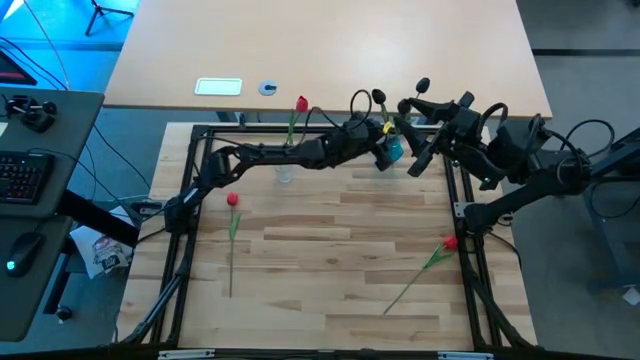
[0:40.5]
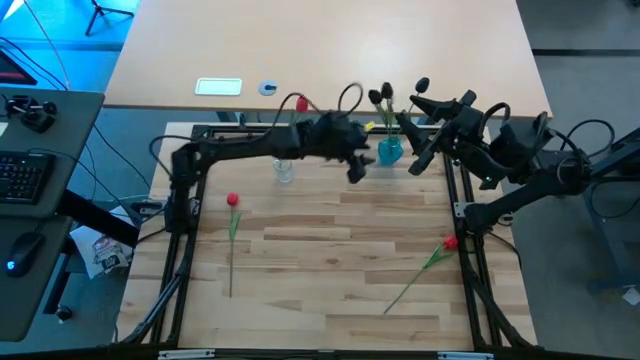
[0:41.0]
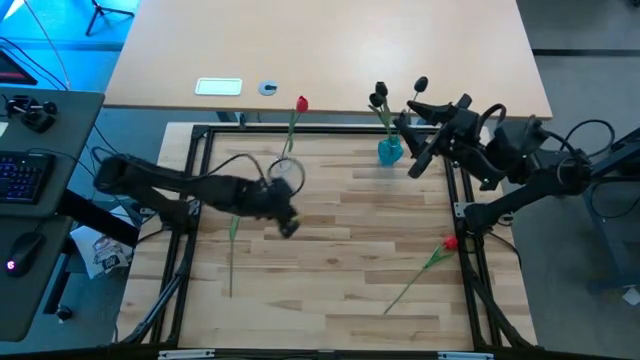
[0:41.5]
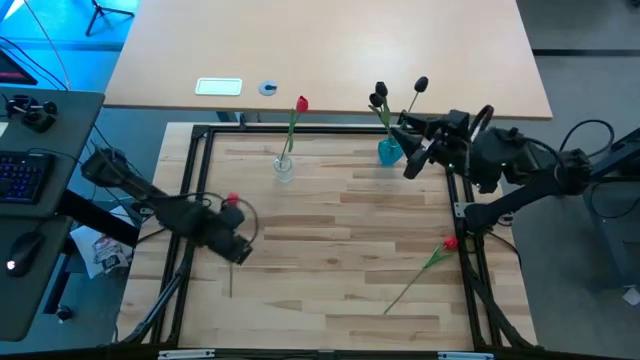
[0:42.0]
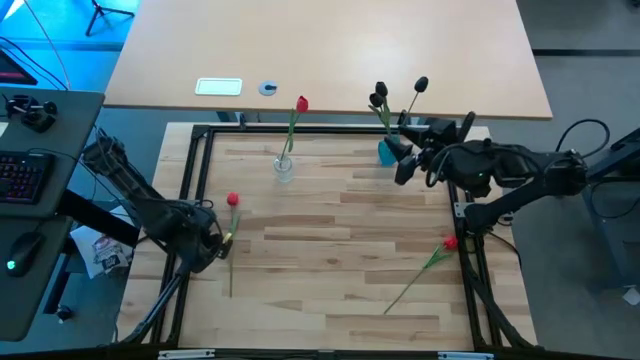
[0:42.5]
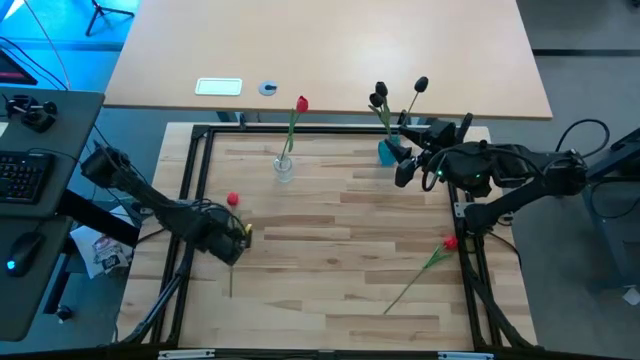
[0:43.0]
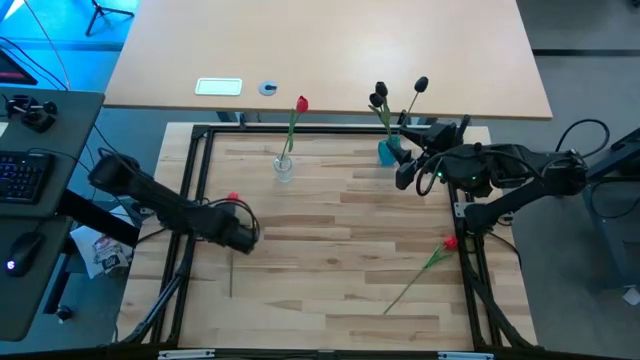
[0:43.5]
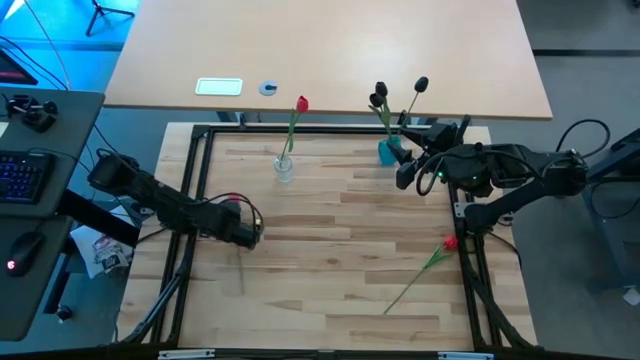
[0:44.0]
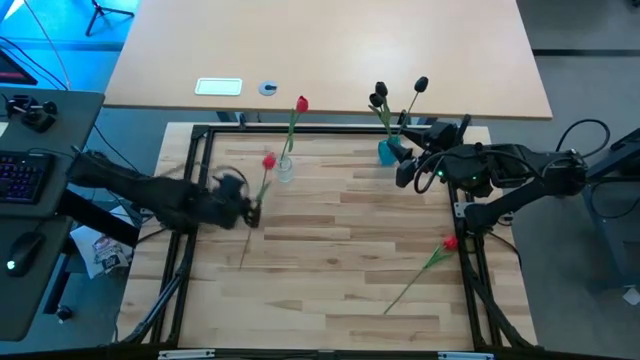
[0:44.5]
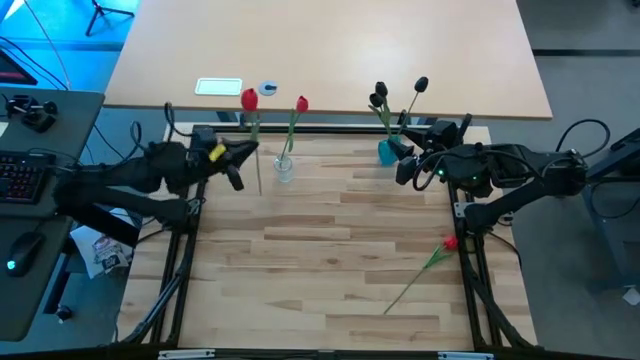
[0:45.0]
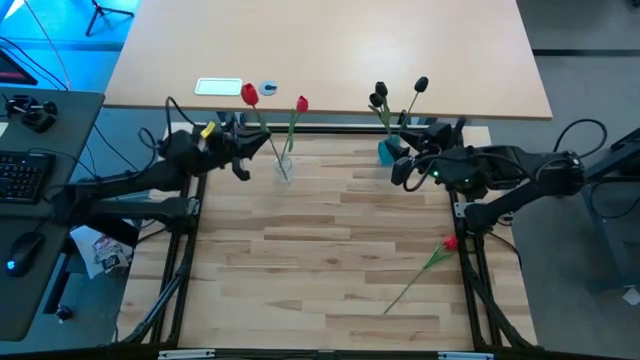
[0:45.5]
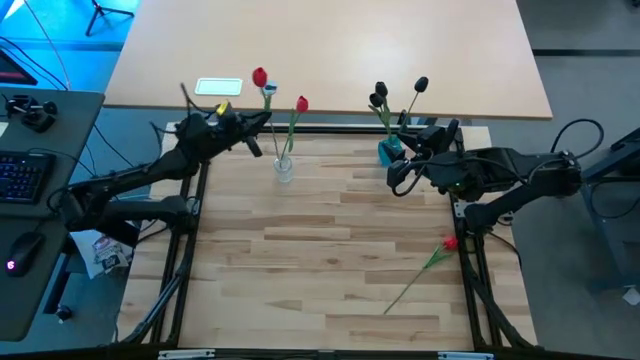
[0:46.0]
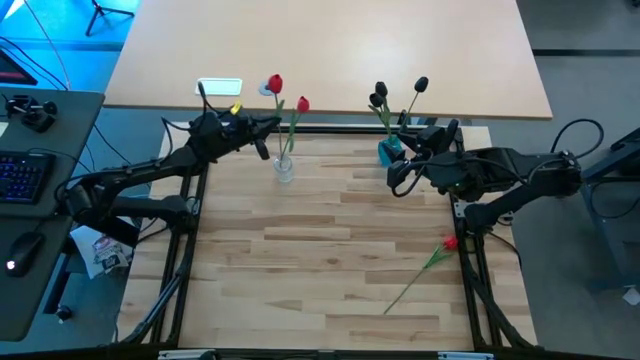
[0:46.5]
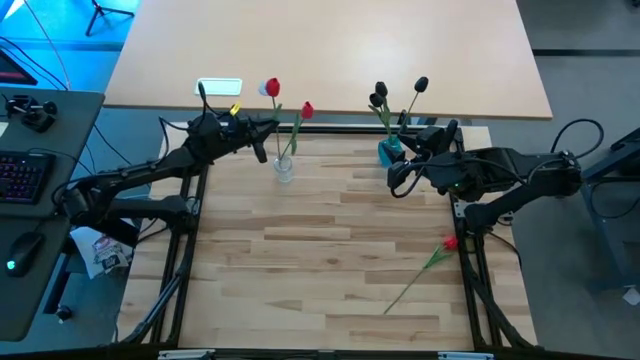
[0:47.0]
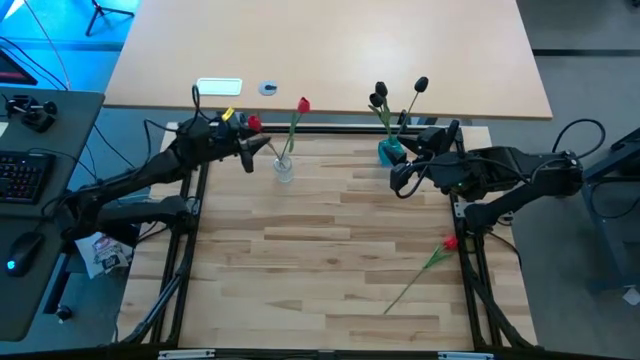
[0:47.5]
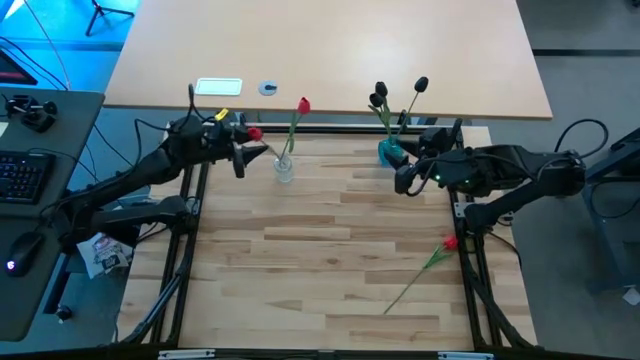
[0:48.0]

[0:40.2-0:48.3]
Task: Sort flowers into vase by color
Put the left red flower into the transparent vase

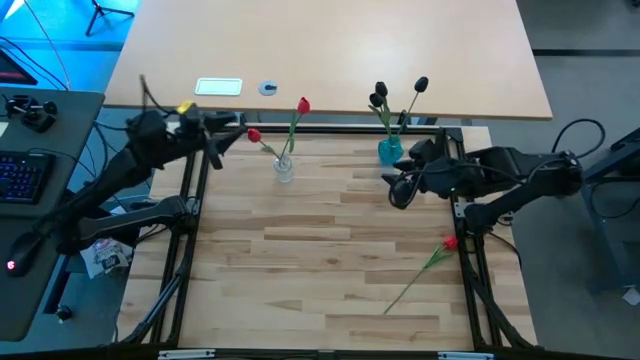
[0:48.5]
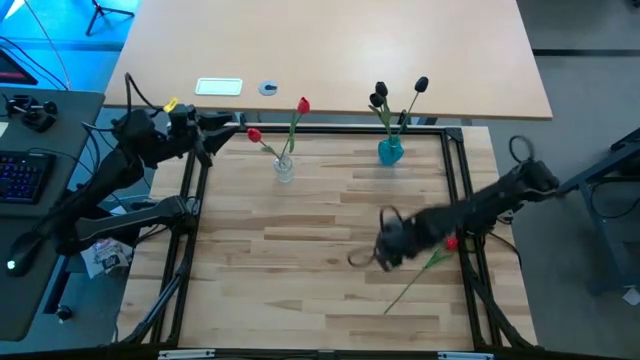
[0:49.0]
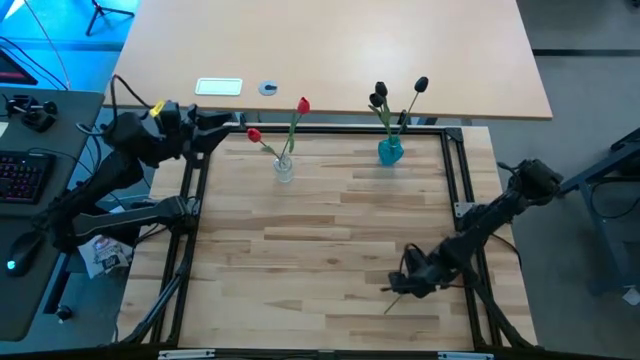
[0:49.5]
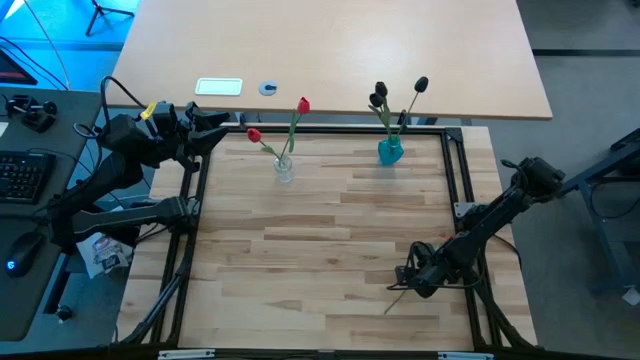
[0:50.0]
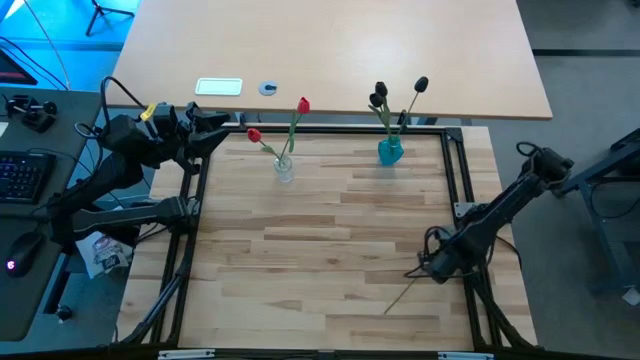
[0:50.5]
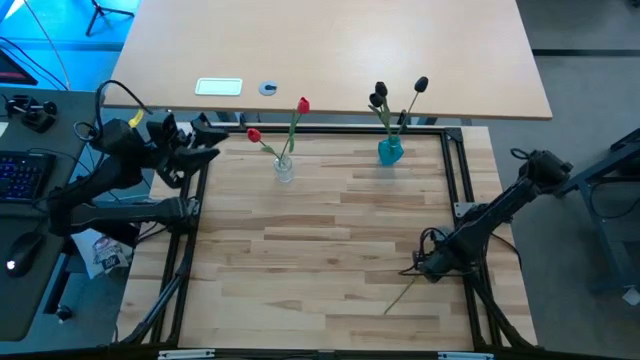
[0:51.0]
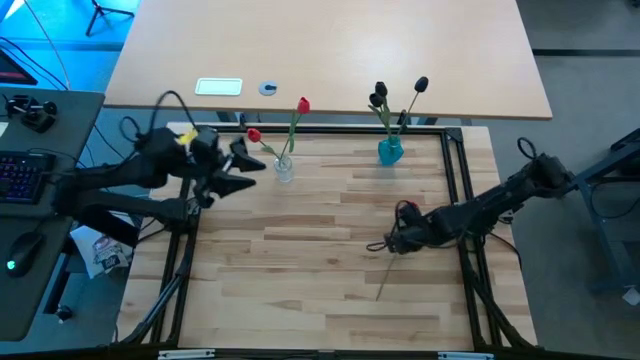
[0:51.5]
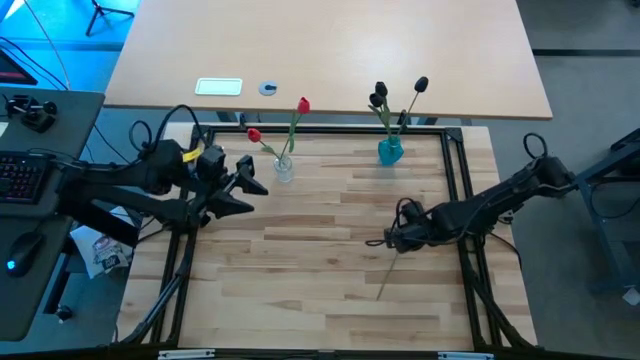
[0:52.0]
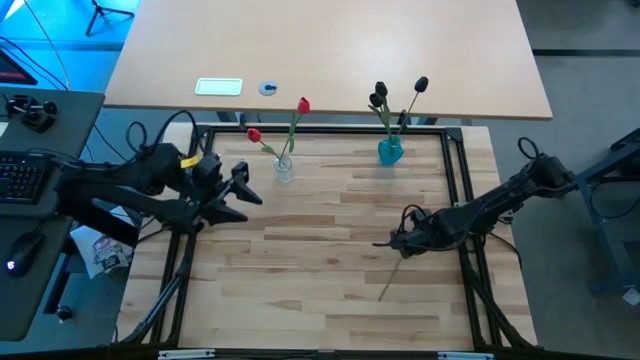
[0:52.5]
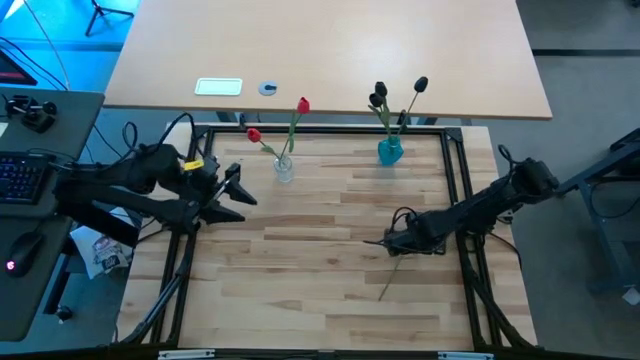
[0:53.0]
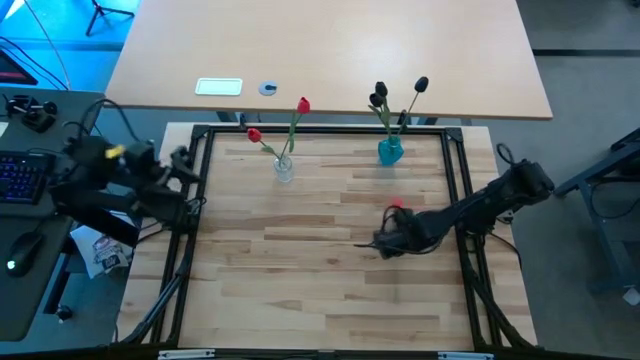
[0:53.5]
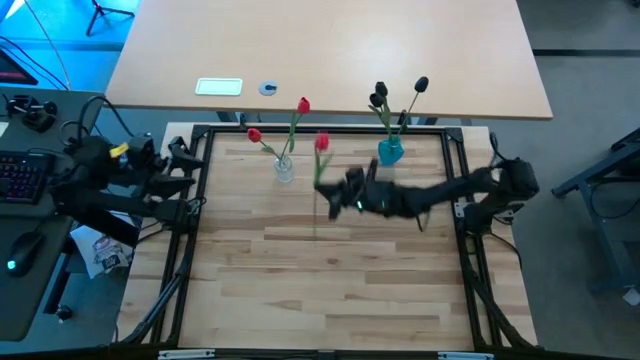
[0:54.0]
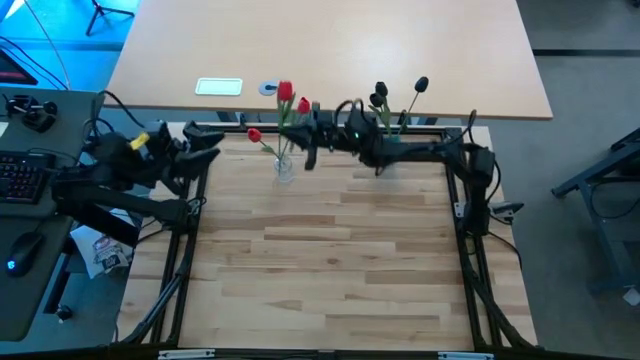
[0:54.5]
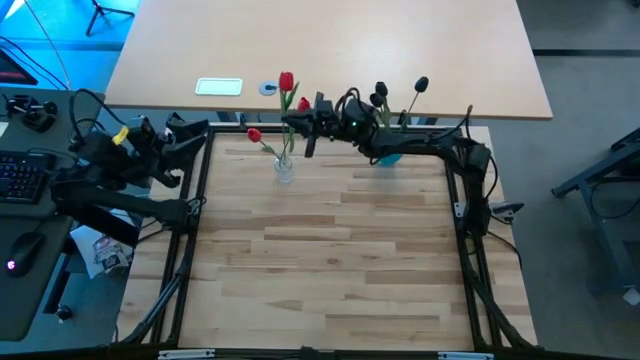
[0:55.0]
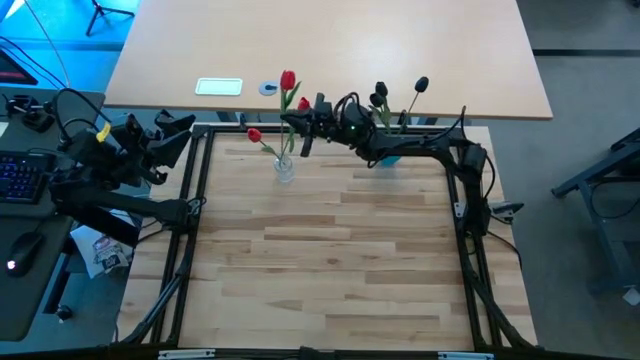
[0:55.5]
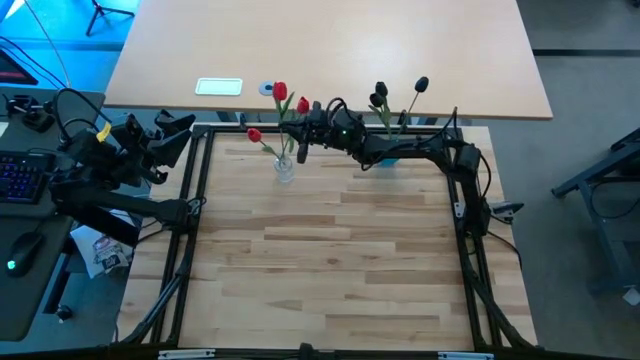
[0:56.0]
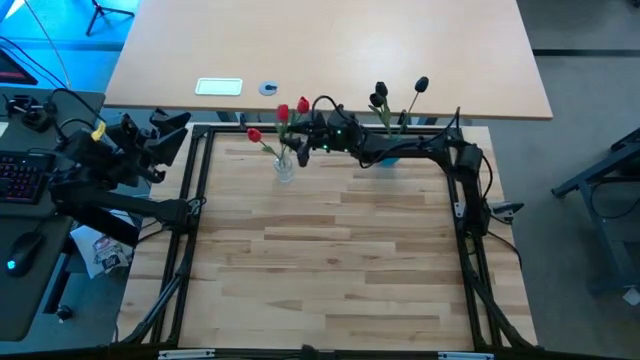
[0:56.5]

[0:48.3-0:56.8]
Put the red flower into the transparent vase

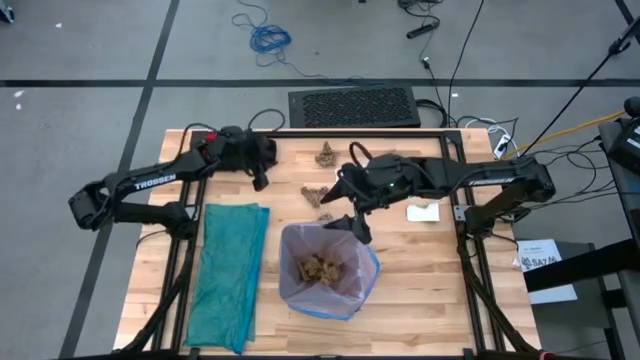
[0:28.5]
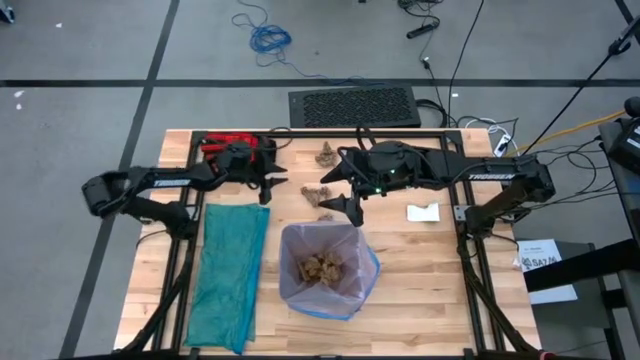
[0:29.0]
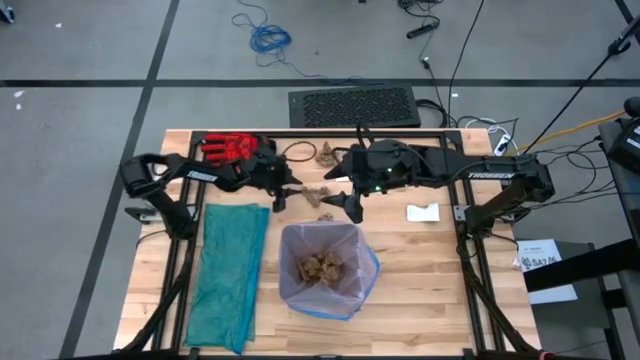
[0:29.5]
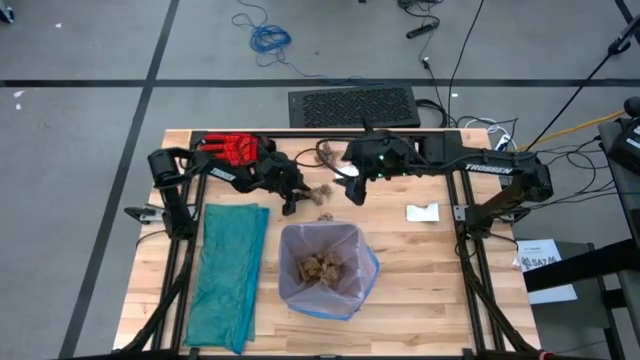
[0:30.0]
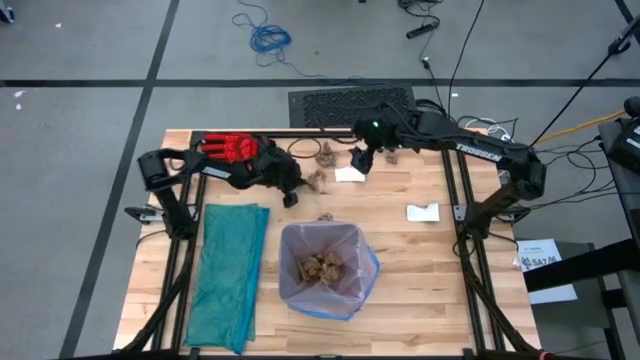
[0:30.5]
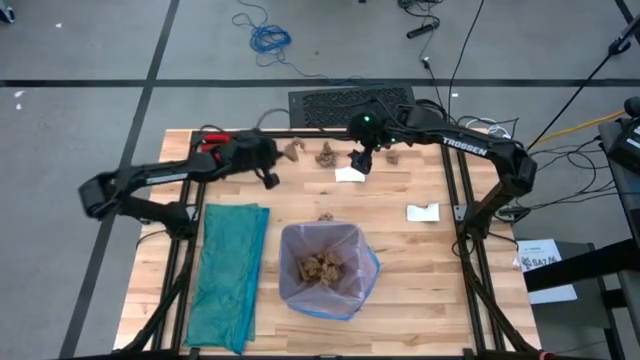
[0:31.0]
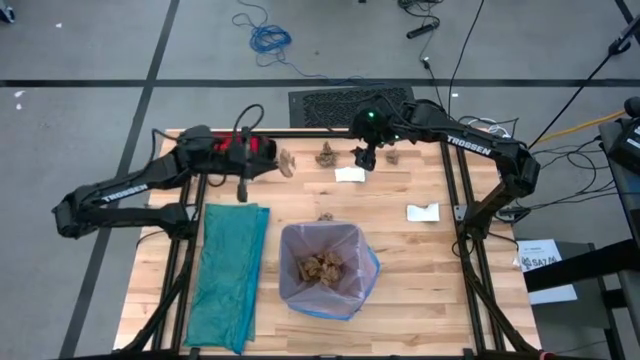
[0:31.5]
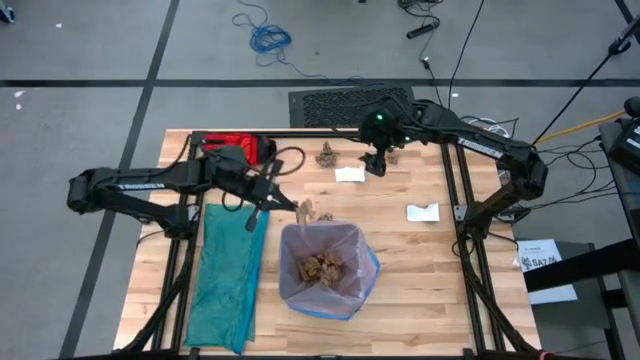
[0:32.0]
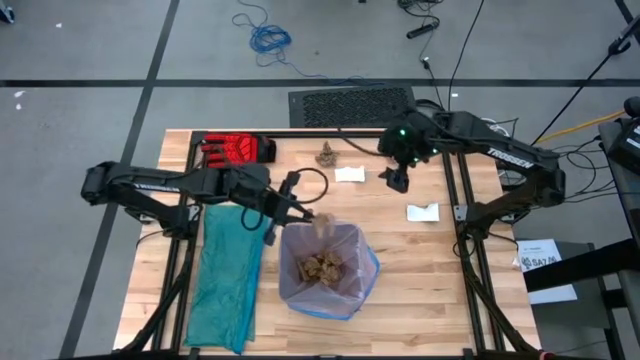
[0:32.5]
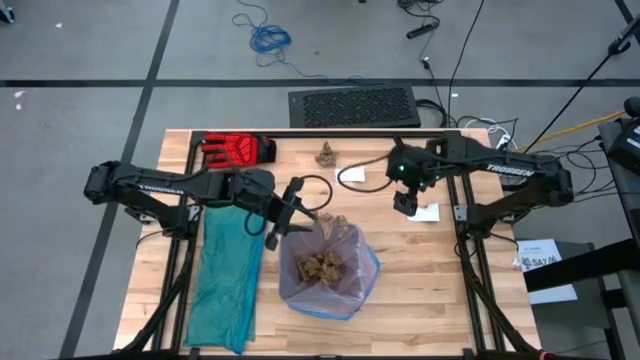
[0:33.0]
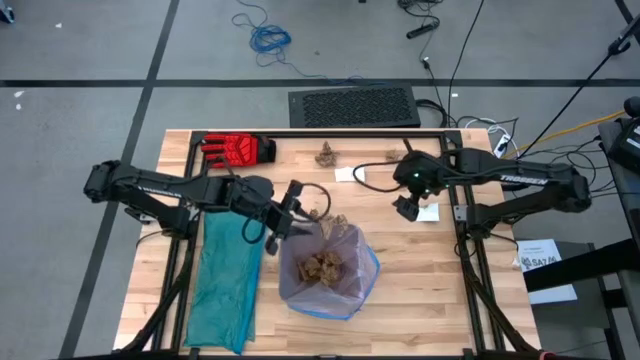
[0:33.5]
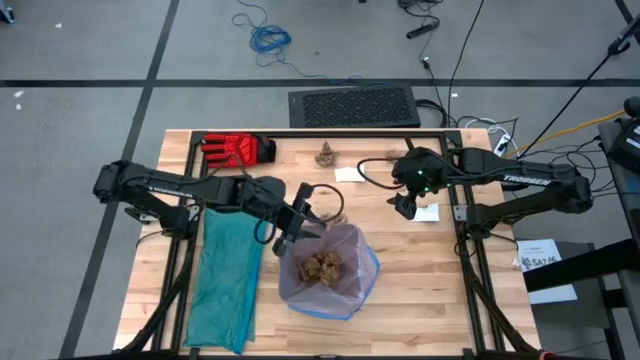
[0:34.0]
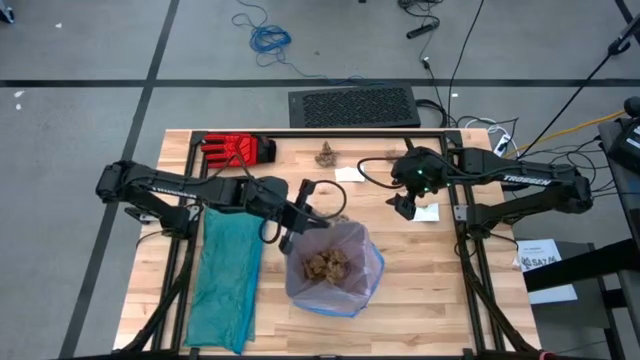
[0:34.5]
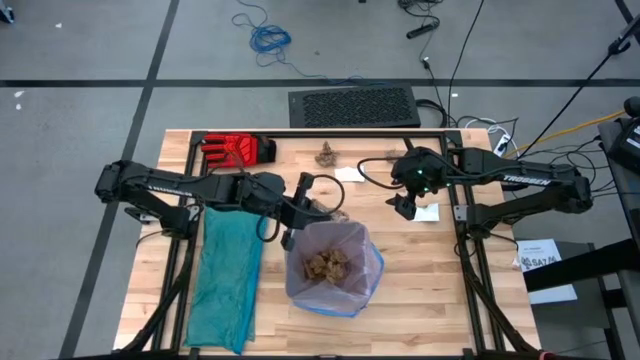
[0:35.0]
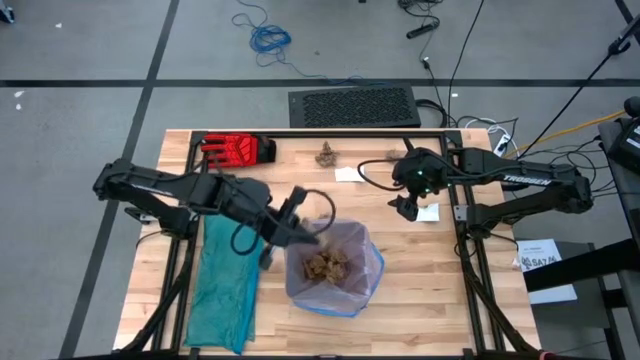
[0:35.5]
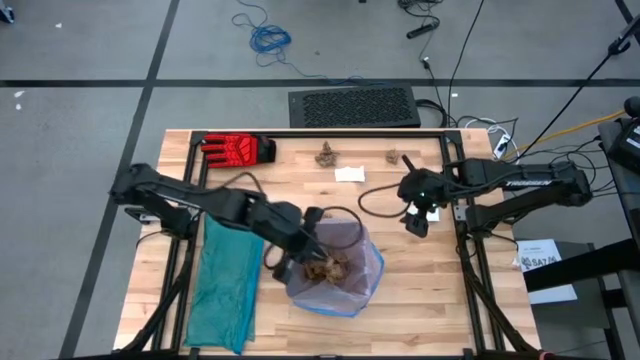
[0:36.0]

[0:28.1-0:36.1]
Task: place trash/remove bag and relplace
Put the brown napkin into the black trash bin
